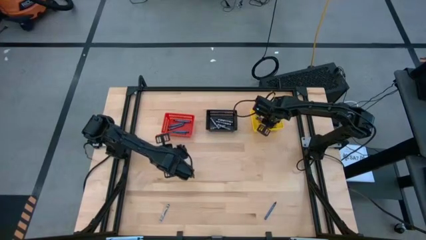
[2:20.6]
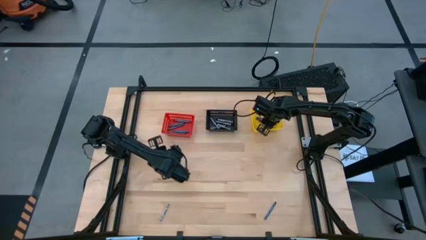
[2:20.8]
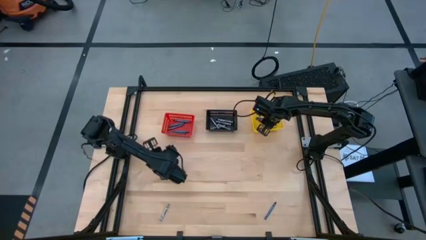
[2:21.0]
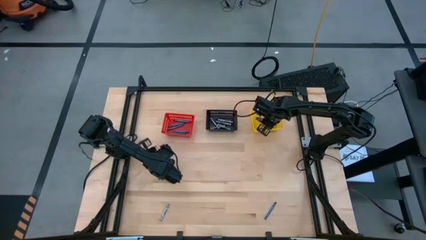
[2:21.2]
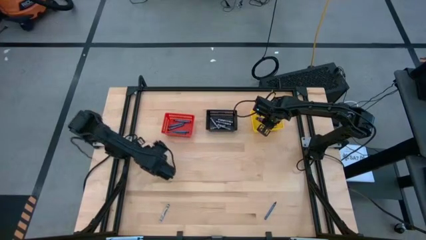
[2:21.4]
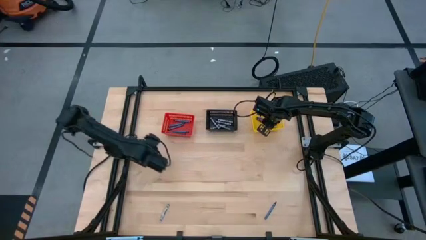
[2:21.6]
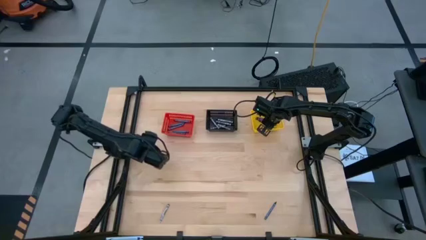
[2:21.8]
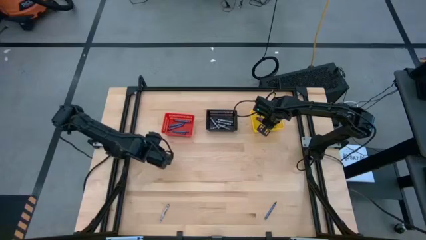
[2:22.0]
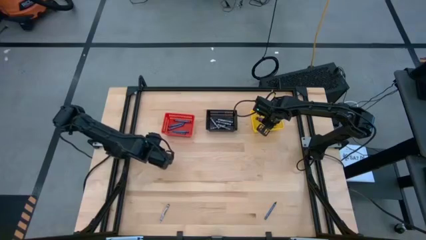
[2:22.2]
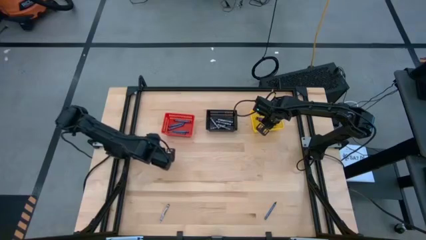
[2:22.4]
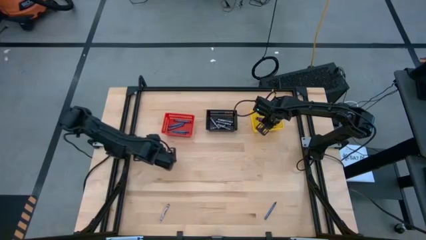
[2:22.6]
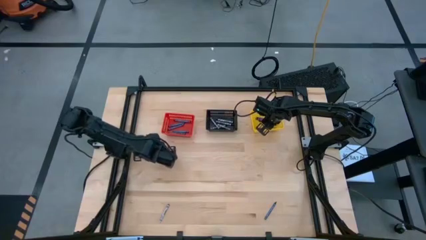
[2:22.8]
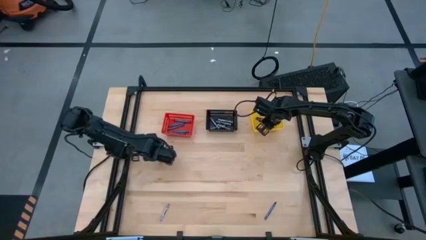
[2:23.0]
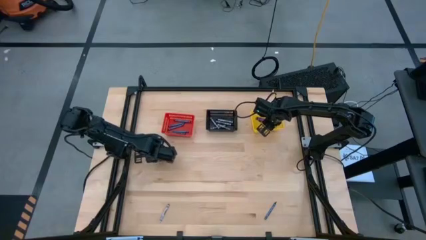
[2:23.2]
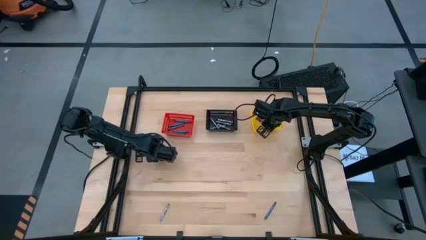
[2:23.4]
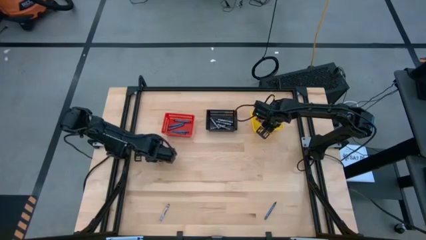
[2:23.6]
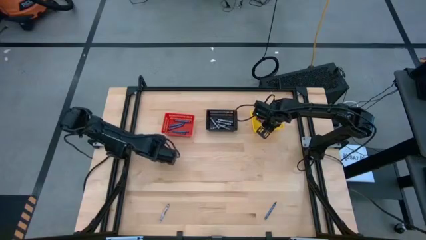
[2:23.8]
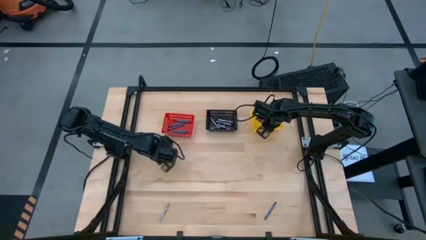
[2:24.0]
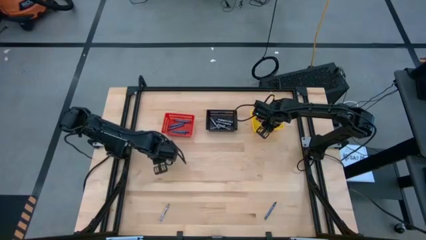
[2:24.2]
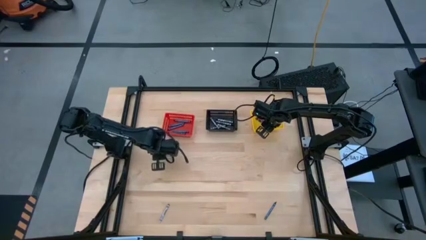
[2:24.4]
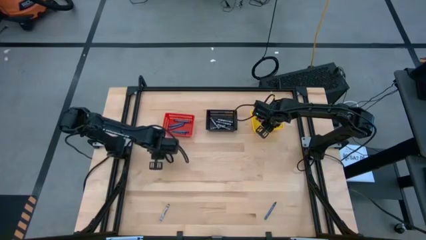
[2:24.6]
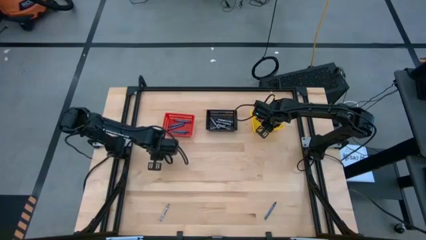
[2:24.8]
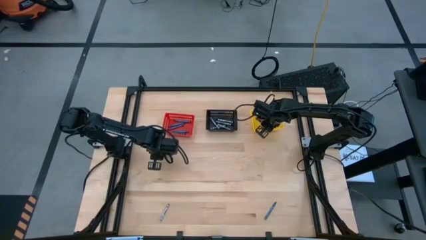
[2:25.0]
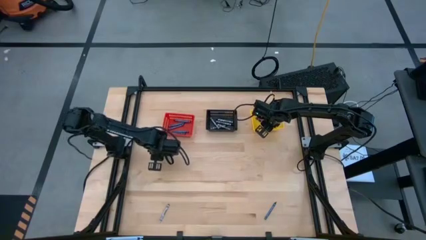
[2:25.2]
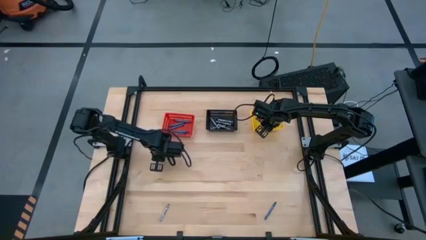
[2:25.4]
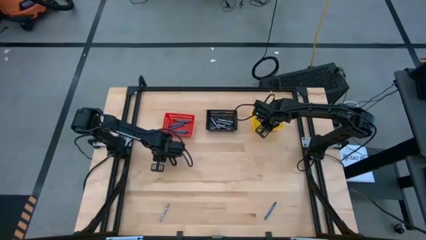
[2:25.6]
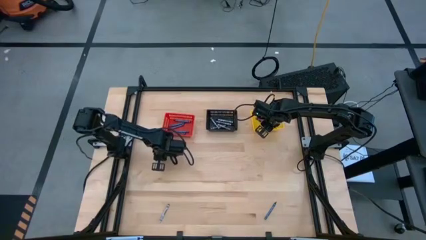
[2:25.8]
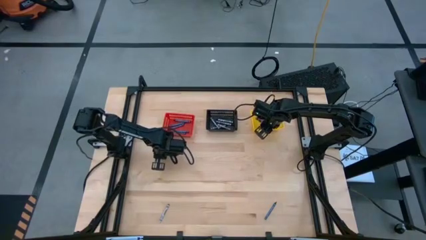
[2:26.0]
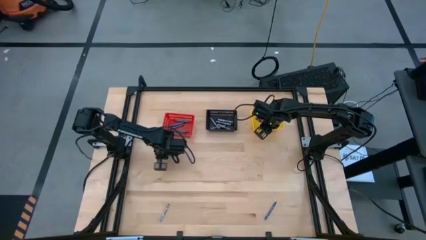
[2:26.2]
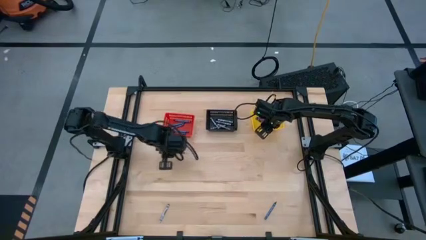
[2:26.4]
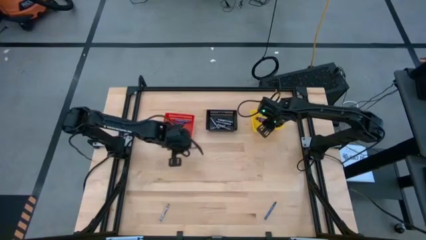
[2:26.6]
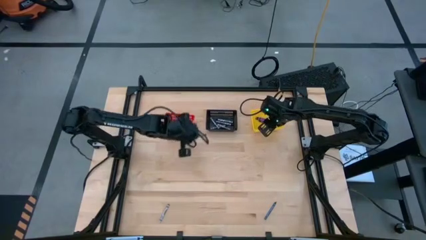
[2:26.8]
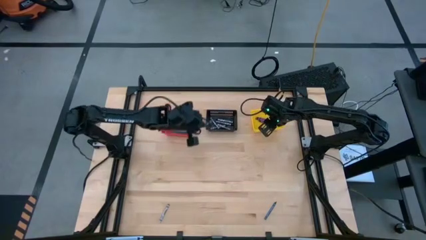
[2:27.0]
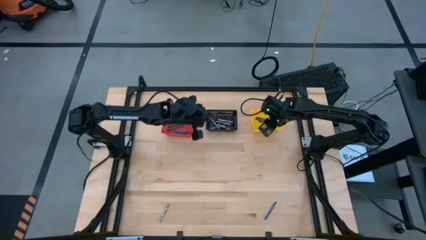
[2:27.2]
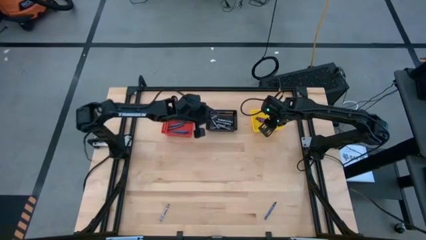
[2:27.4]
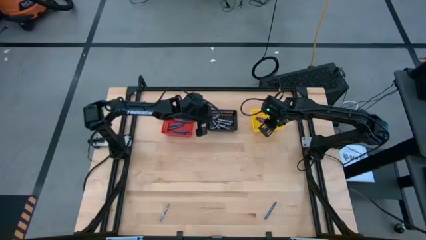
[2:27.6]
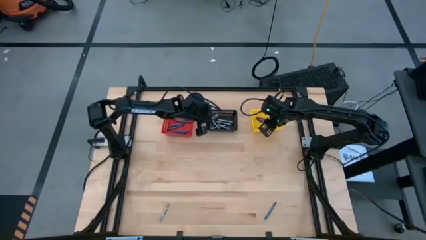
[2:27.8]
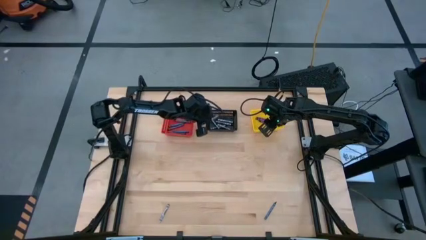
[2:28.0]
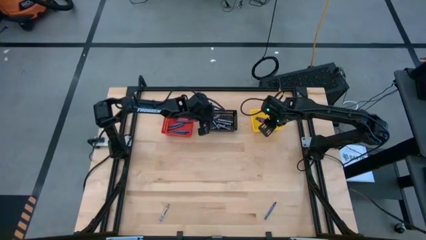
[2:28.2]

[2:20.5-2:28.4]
Task: Sort crayons
Put the black crayon into the black basket

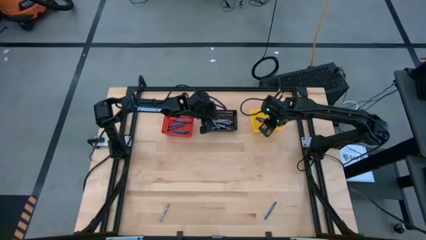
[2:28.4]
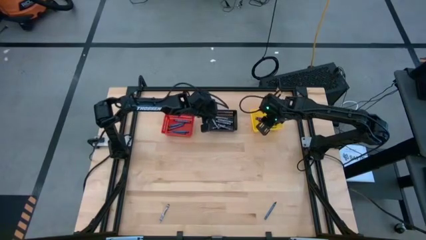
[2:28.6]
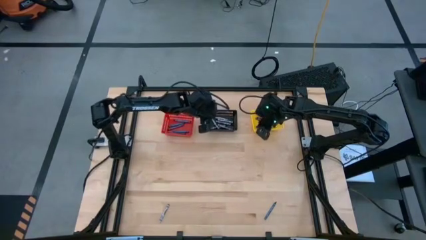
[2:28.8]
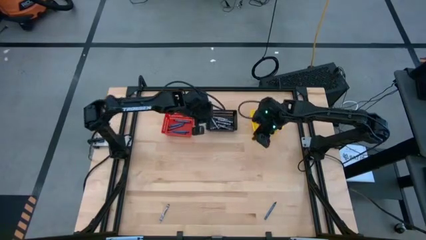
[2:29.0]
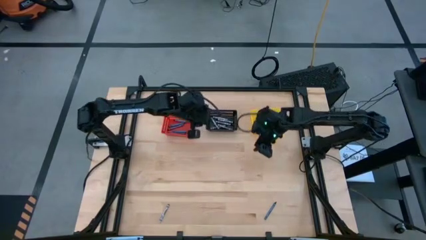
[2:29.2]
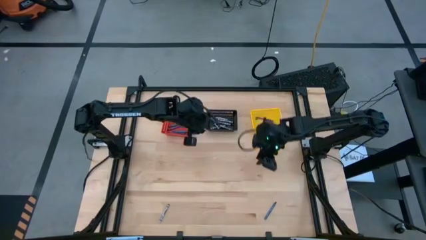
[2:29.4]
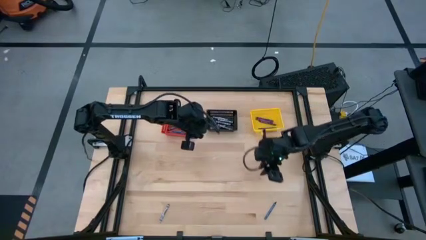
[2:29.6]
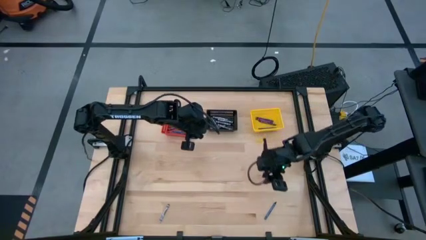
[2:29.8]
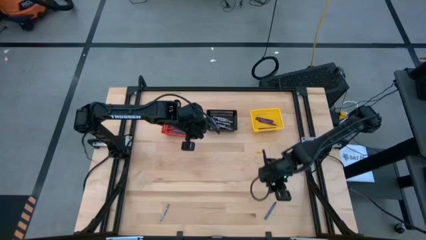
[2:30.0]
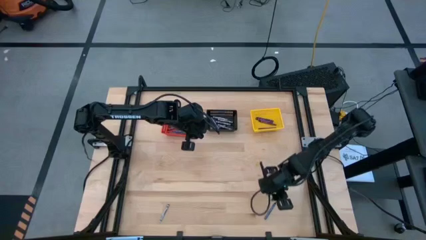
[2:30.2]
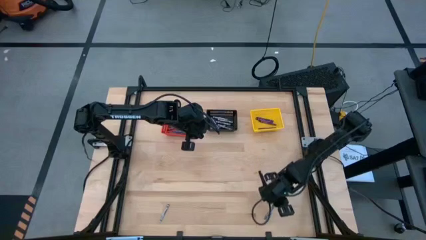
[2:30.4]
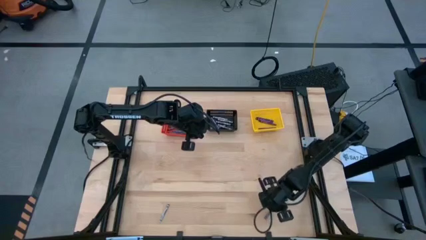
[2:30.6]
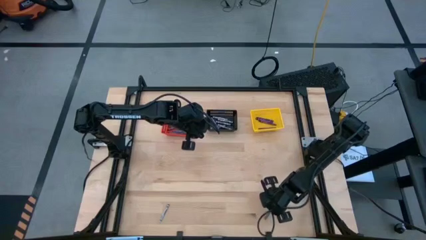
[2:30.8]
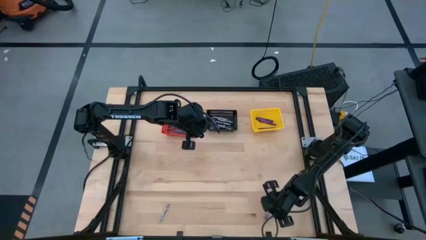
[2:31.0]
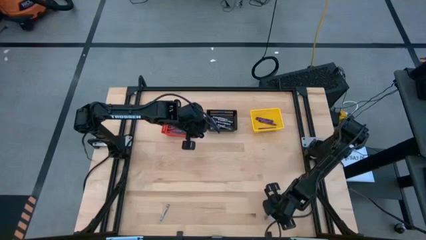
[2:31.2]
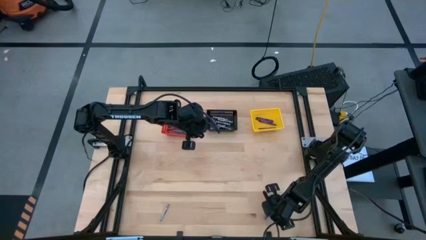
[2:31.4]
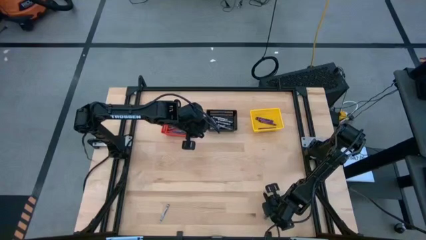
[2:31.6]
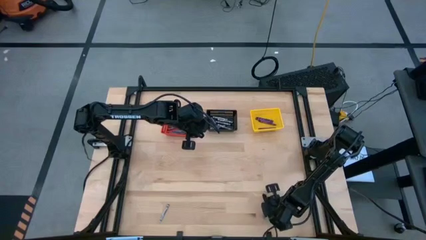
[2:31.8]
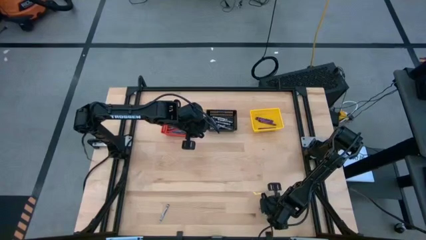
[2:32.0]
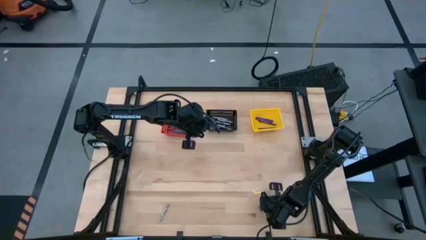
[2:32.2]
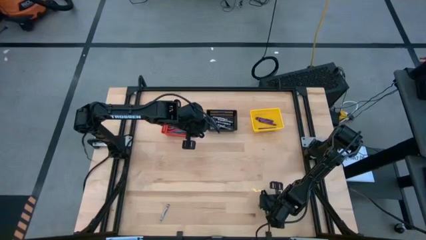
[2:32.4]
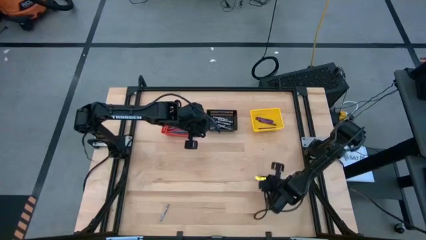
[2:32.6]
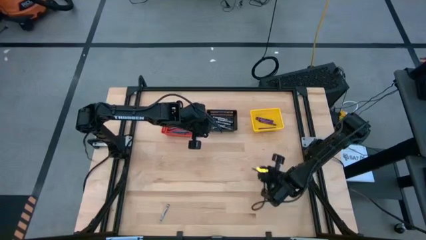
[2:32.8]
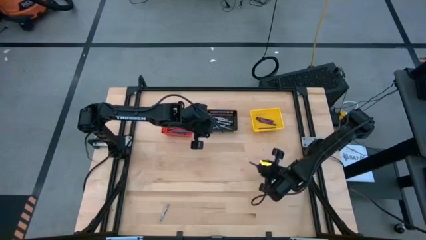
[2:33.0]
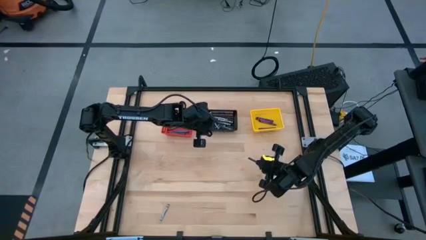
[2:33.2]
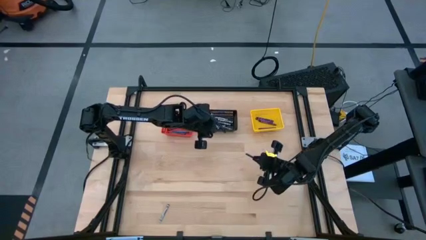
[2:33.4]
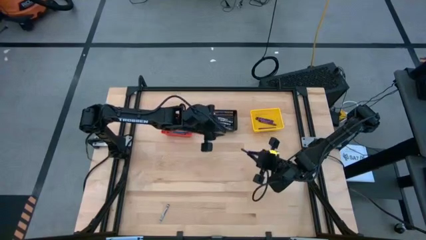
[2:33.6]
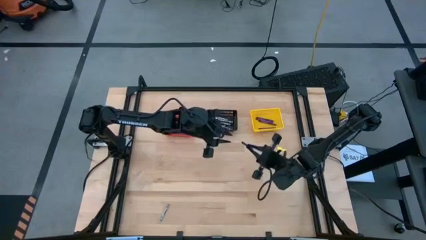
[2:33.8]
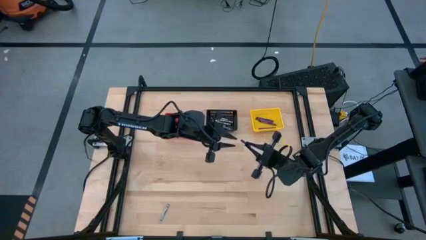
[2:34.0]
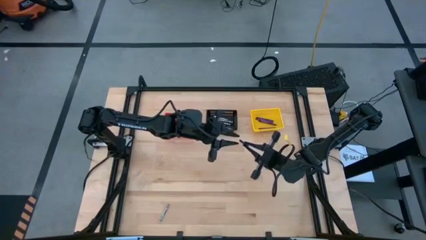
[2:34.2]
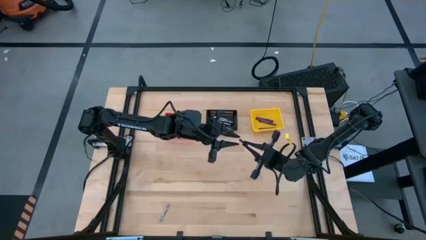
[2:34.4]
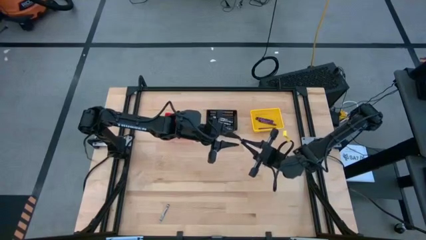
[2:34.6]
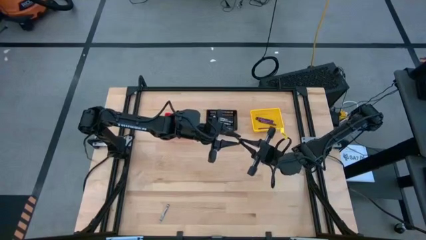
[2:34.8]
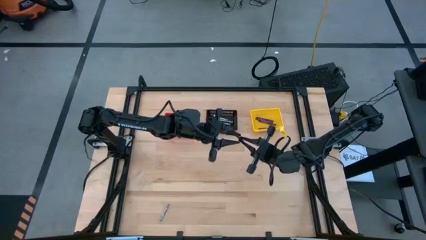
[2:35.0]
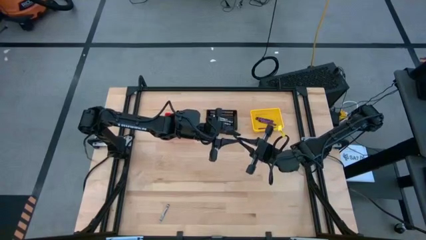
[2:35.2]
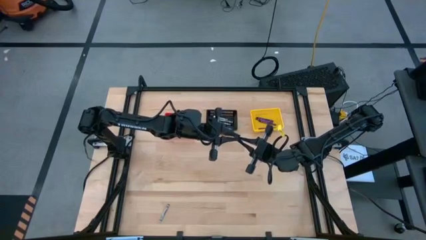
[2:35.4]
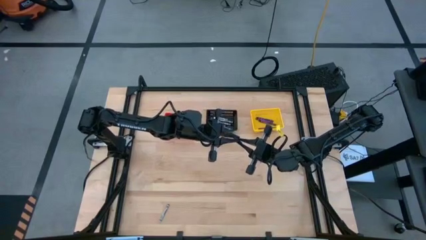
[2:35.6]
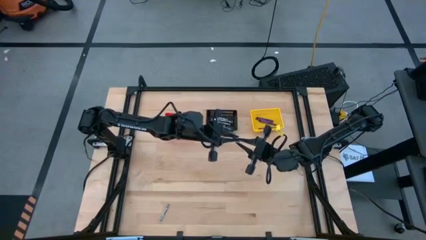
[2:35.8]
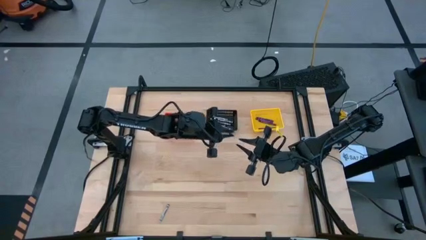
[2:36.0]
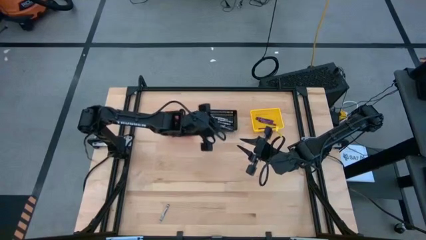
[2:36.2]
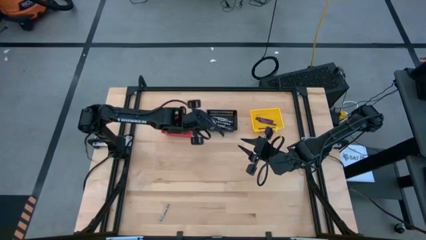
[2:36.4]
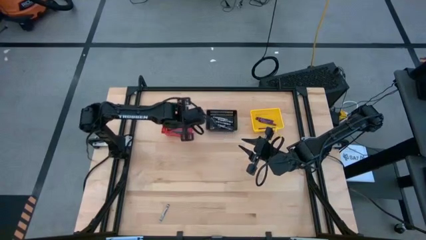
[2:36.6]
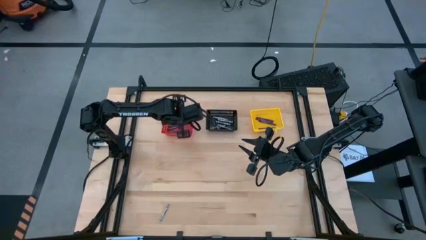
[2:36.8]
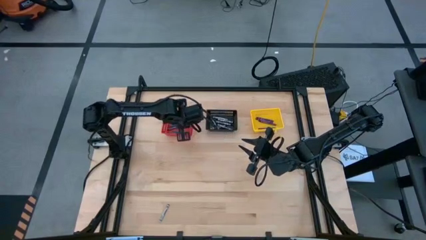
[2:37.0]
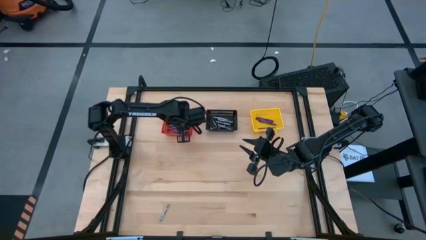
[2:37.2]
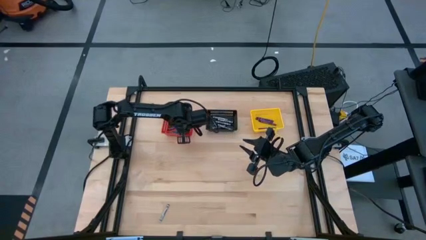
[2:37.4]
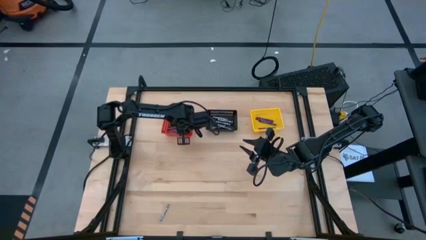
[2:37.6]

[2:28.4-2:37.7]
Put the blue crayon into the red basket
